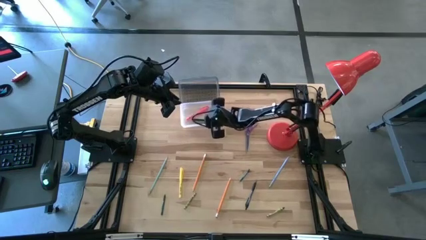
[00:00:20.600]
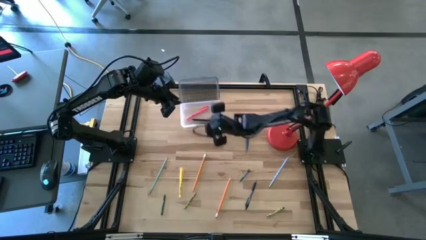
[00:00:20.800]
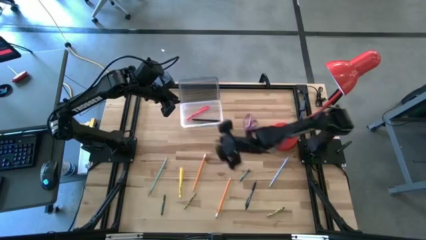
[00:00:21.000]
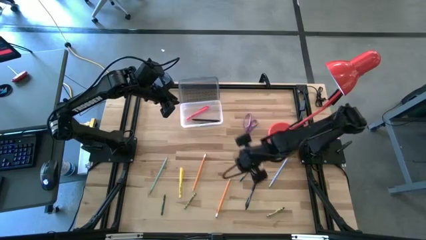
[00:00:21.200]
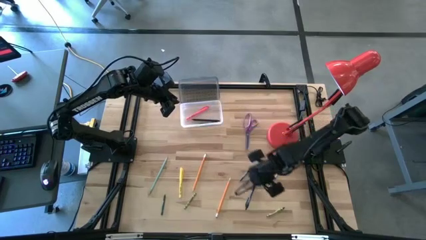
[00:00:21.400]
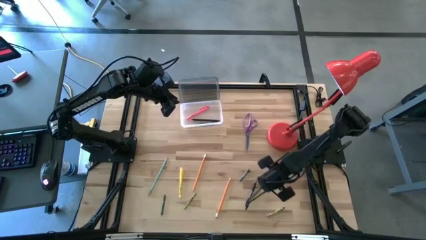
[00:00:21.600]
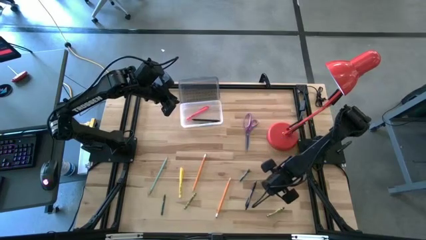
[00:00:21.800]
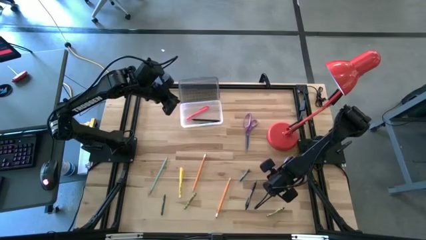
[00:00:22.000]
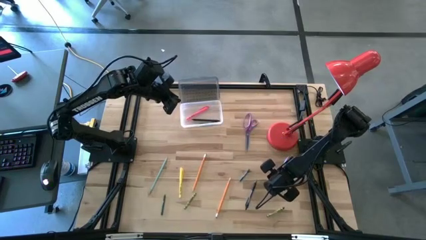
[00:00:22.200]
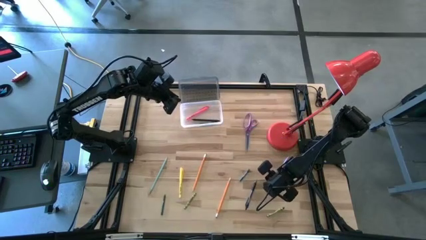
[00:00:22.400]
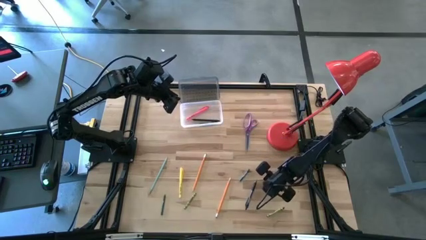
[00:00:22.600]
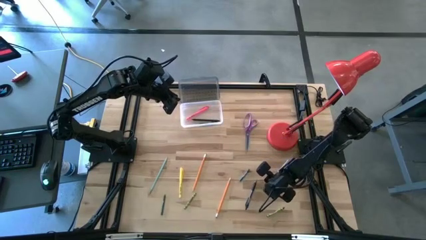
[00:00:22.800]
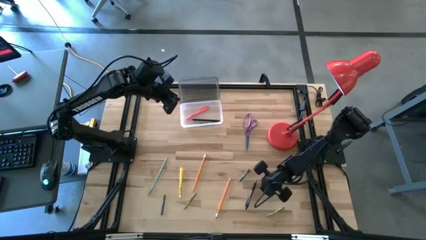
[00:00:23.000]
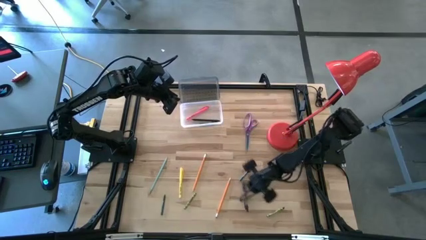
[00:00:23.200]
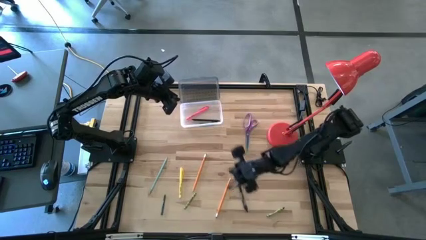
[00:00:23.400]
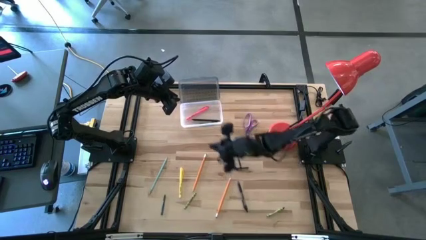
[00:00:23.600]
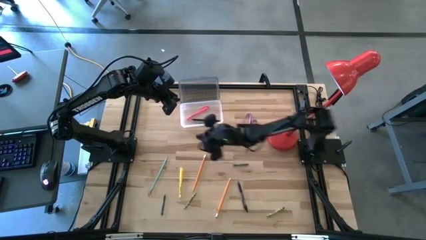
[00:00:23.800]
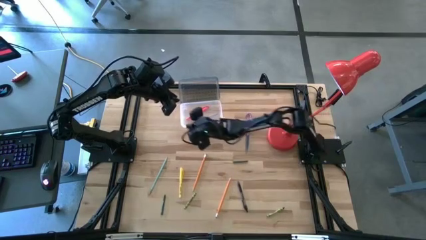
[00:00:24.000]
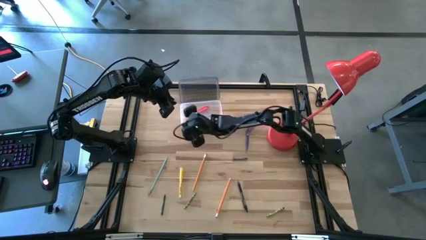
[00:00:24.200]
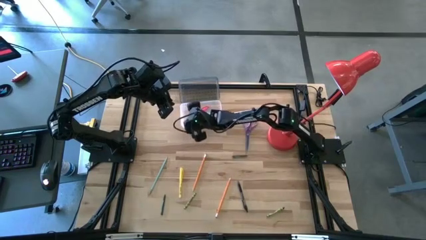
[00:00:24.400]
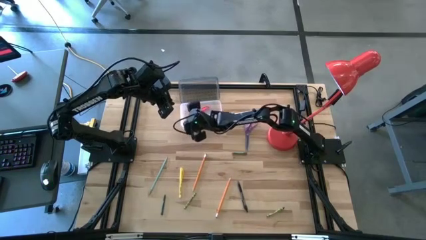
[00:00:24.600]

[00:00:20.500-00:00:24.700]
Task: Pick & place school supplies into a supply box
Put the blue pencil into the supplies box

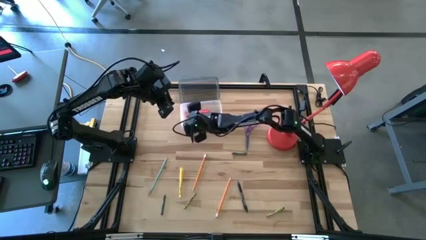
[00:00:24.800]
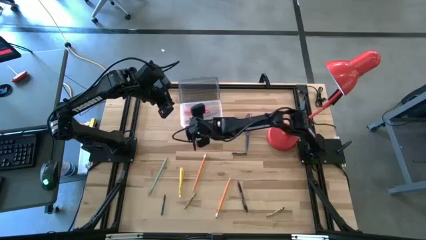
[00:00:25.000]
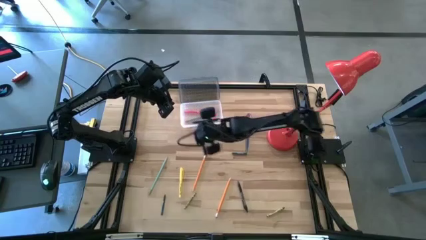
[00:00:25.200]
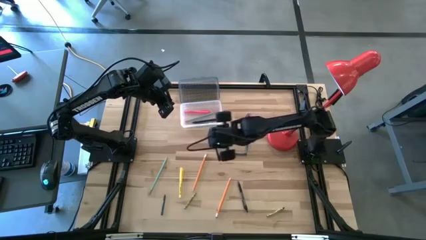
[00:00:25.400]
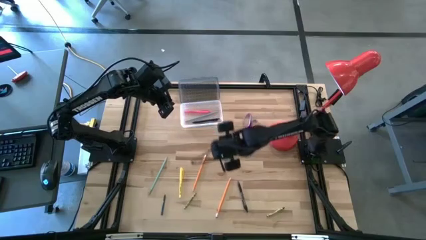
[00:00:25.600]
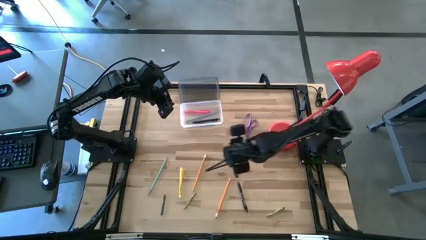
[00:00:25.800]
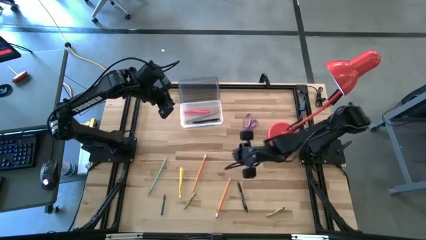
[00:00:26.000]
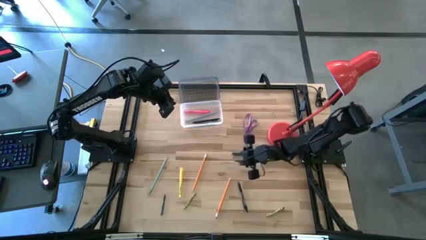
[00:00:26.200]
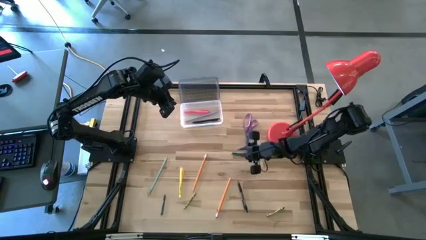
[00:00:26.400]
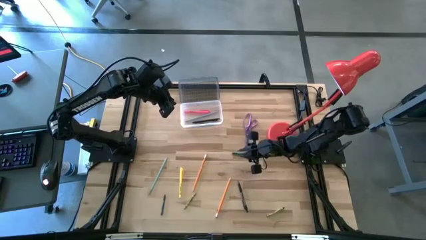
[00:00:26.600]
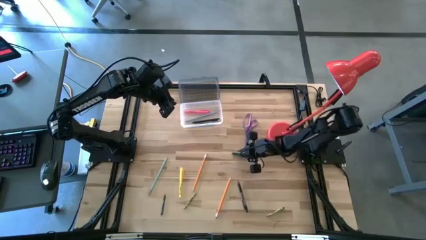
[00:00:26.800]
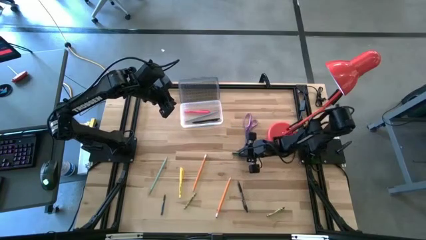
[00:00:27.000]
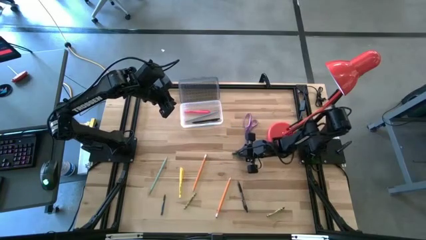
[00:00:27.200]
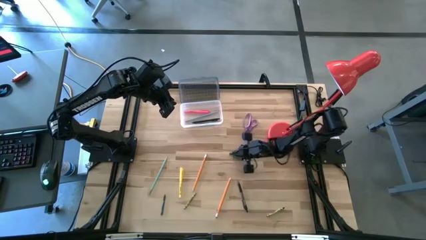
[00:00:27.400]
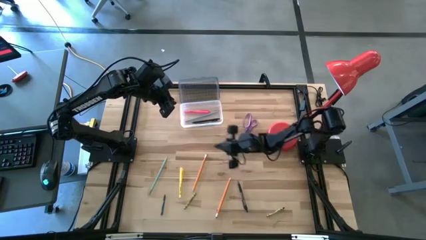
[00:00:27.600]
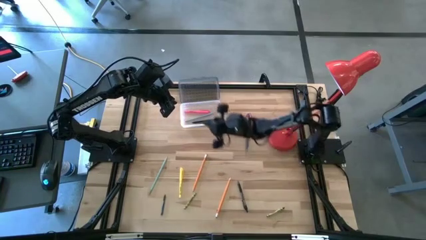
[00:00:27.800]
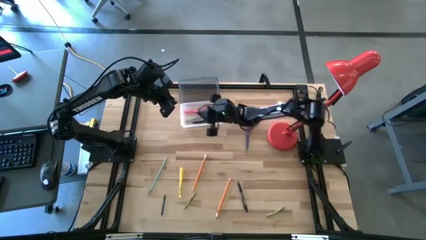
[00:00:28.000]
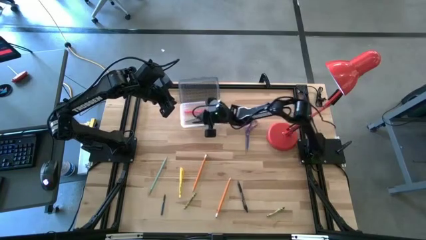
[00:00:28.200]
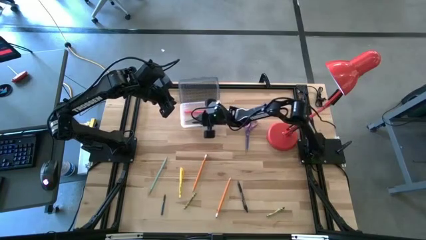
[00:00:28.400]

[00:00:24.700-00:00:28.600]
Put the dark green crayon into the supplies box

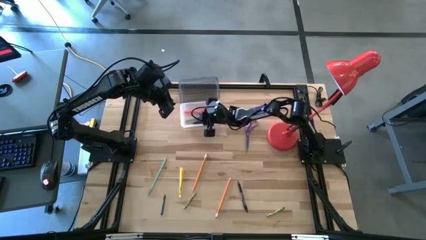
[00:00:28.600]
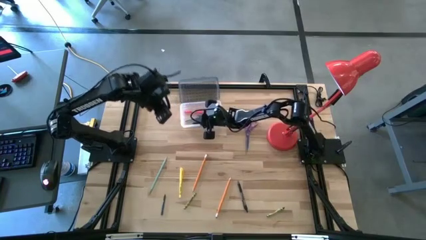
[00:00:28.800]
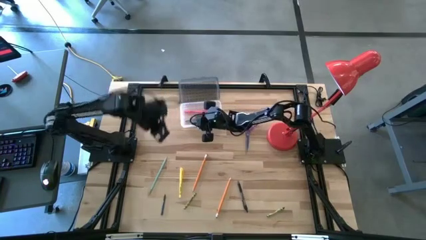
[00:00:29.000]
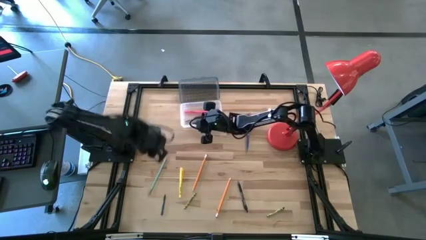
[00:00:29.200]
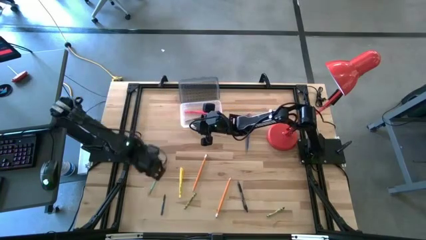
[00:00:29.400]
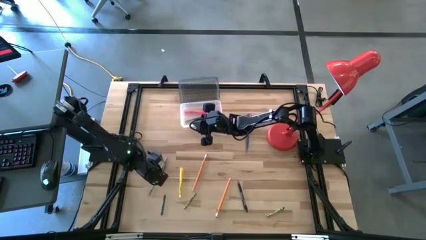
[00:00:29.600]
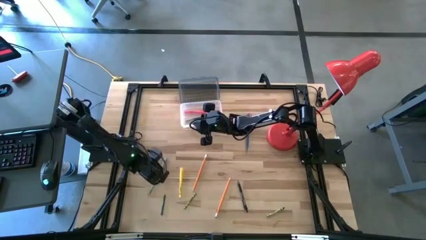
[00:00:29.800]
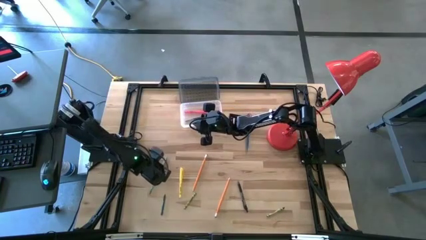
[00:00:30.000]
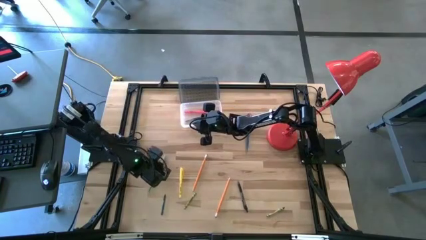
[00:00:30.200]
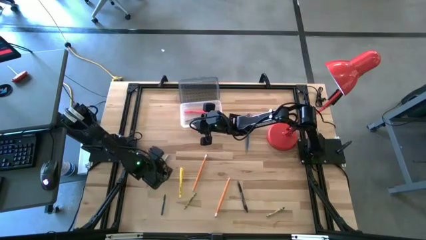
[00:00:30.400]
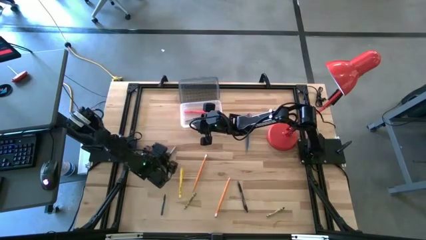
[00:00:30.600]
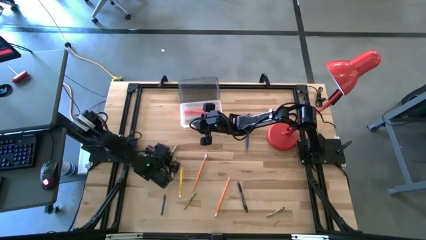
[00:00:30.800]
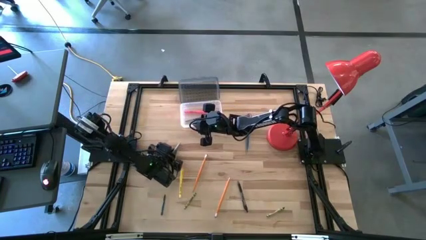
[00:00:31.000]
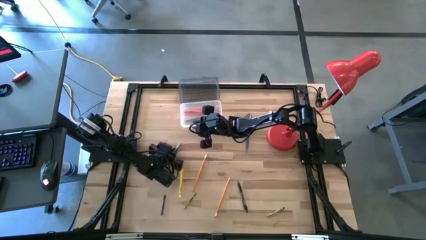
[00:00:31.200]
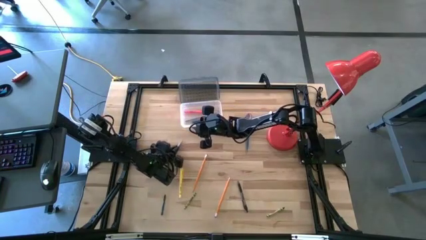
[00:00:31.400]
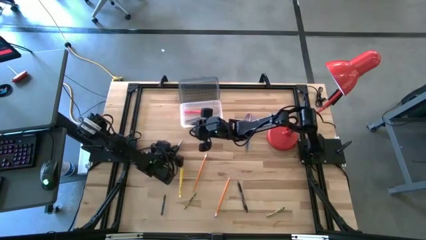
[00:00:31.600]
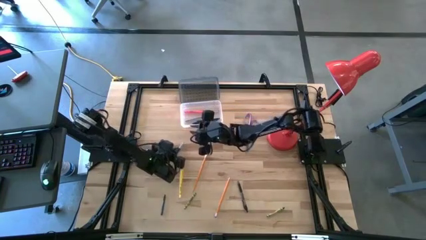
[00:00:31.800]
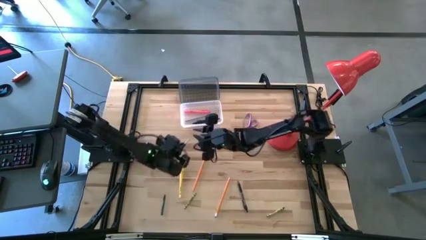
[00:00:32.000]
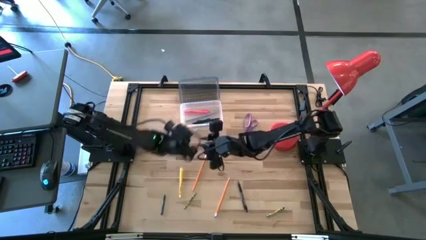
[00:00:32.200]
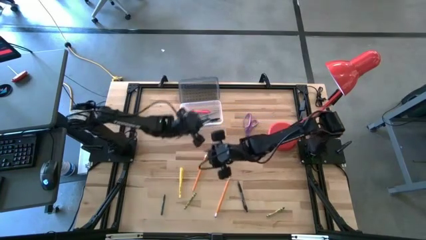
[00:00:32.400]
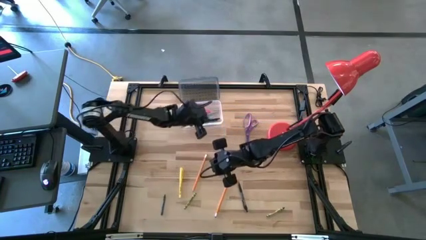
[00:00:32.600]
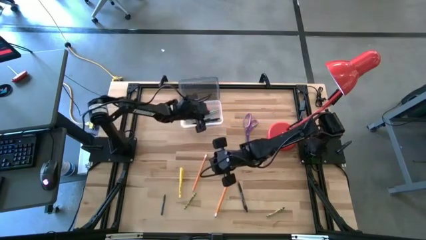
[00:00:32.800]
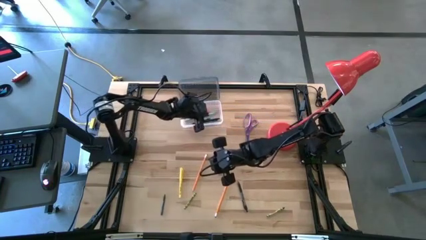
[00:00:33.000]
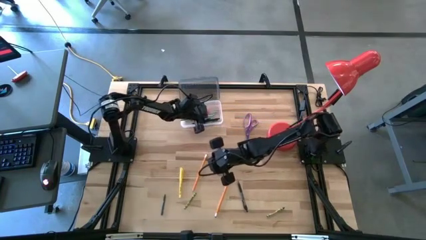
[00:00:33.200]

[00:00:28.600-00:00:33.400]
Put the light blue pencil into the supplies box

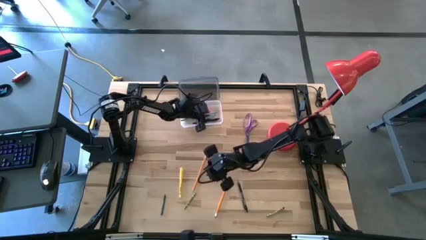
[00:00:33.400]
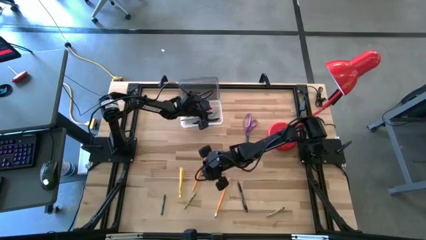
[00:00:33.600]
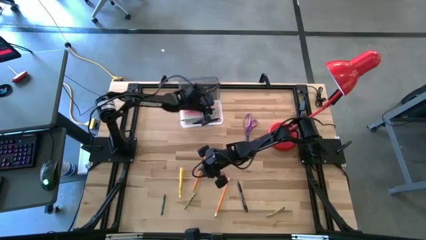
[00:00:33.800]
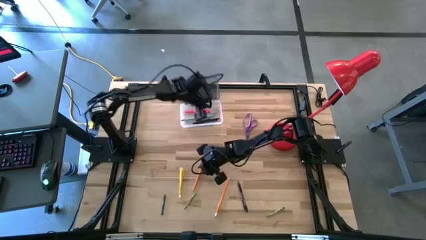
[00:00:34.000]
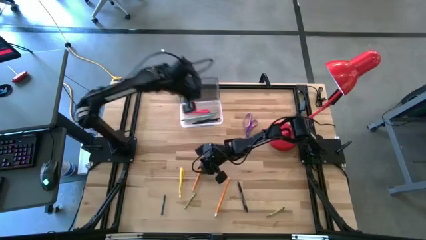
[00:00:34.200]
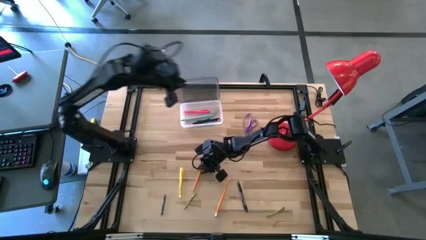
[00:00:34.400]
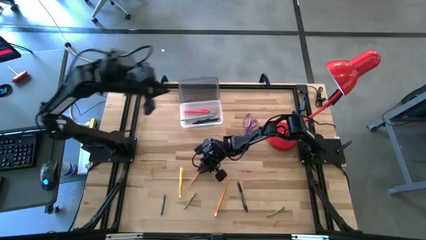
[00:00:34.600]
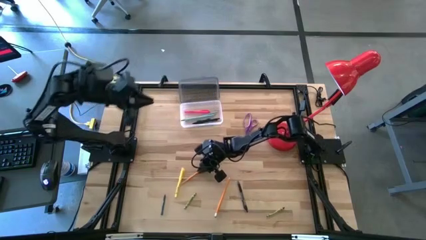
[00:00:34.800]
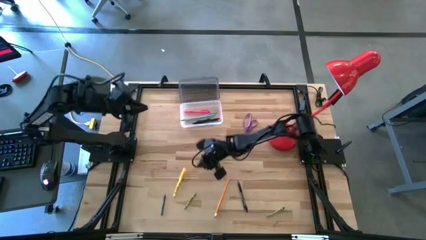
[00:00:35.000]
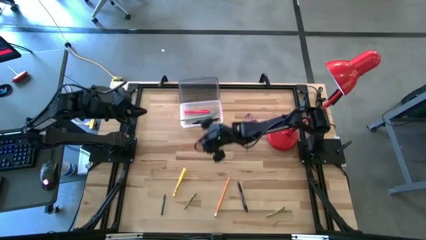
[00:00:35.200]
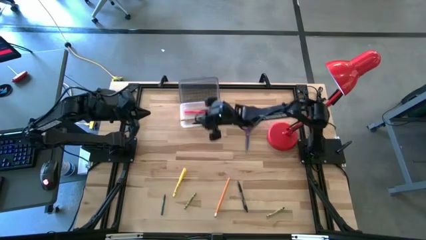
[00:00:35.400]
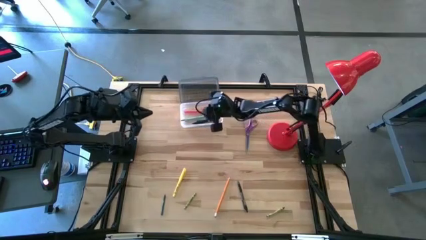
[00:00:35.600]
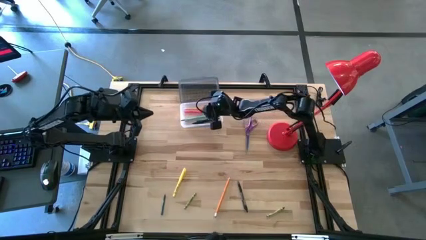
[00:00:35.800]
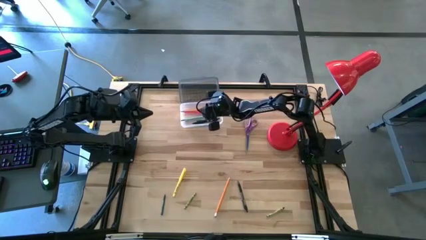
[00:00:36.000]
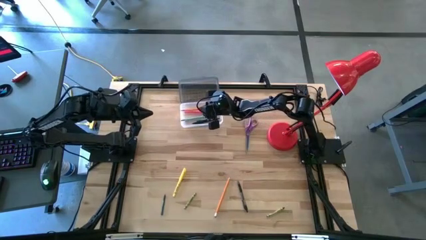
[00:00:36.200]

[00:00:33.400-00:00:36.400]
Put the yellow pencil into the supplies box

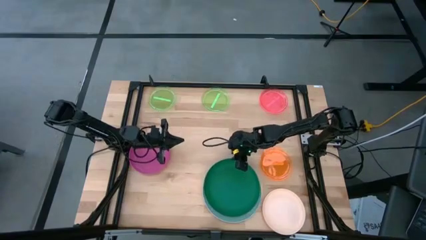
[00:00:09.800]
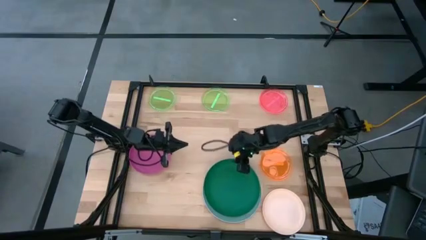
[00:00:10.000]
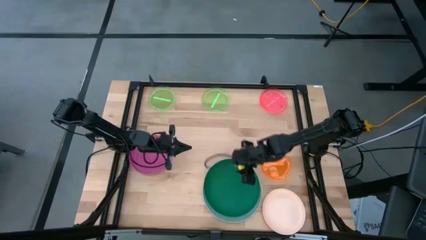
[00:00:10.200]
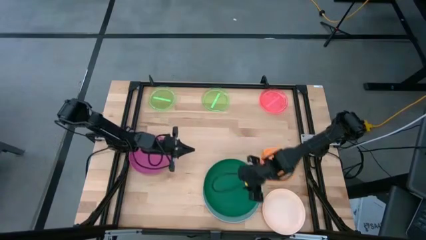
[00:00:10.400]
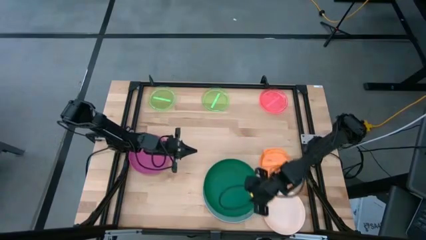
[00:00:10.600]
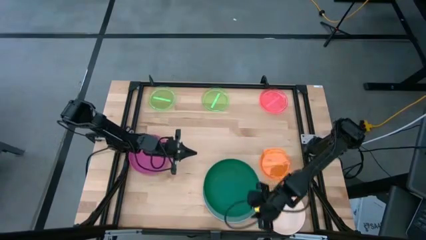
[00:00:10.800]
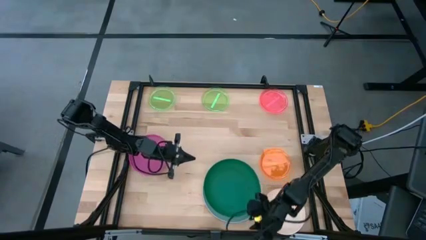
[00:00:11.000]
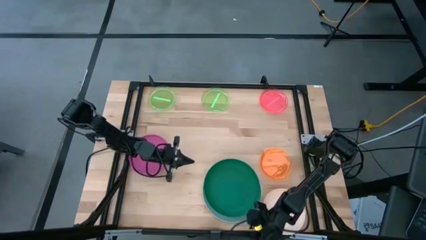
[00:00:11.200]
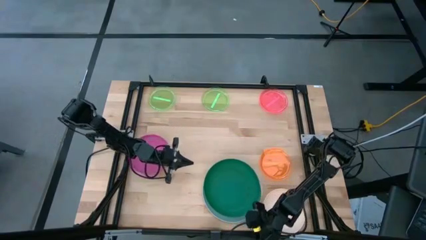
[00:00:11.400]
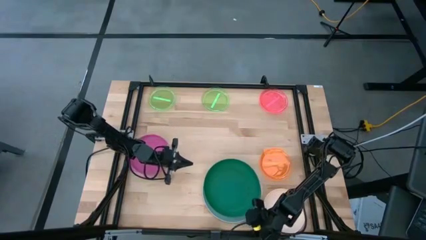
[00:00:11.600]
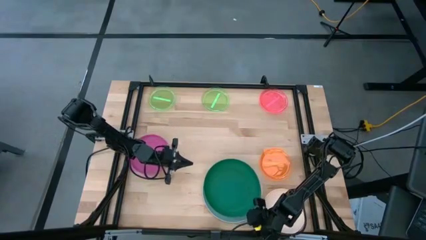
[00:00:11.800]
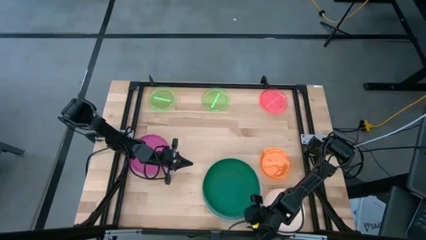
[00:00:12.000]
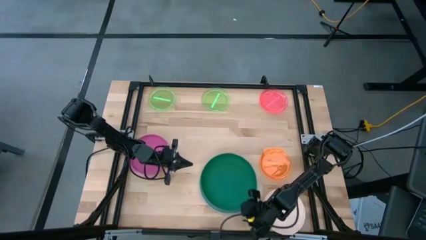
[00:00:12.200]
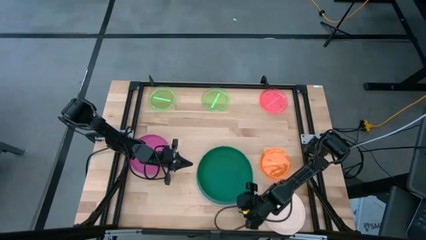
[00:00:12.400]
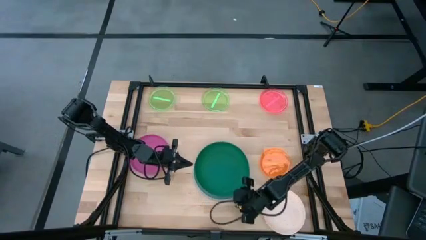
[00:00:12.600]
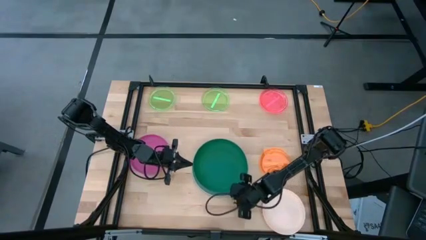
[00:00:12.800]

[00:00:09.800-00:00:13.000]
Task: Stack plastic plates
Move the stacked plates to the center of the table
